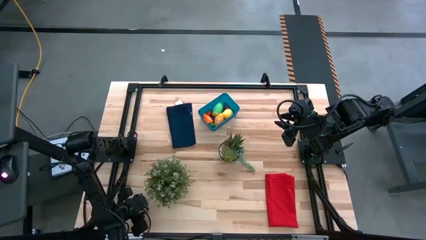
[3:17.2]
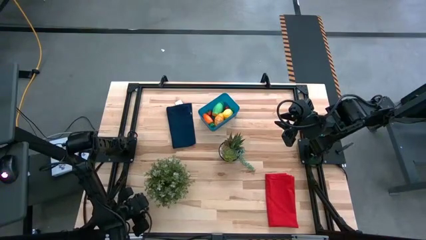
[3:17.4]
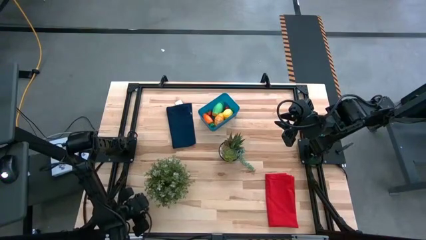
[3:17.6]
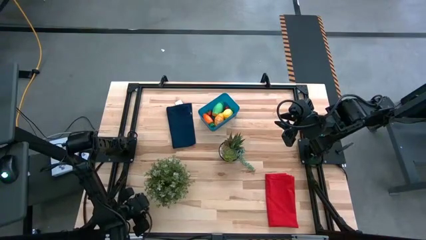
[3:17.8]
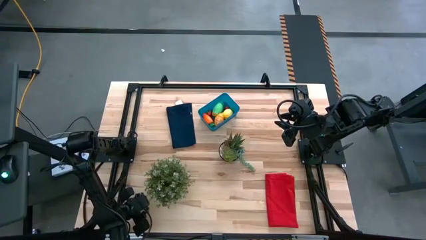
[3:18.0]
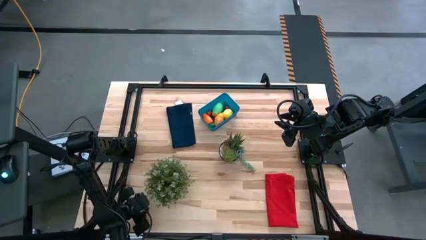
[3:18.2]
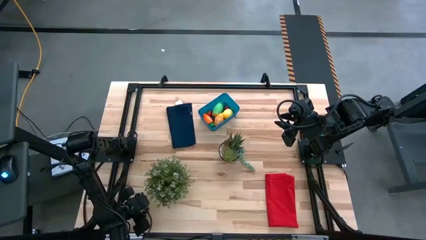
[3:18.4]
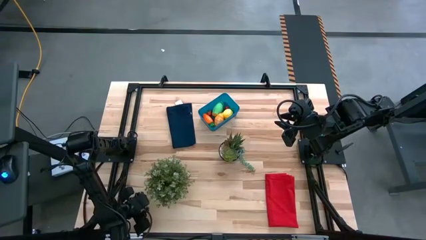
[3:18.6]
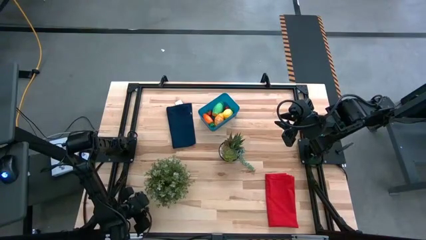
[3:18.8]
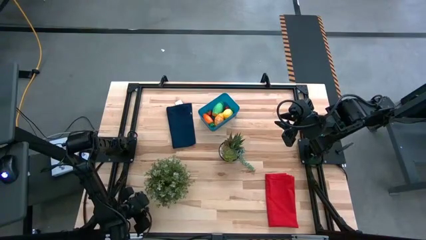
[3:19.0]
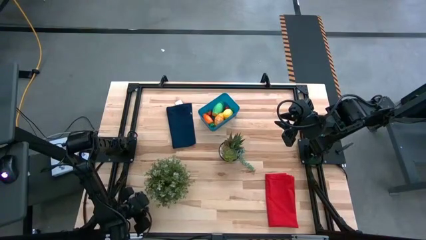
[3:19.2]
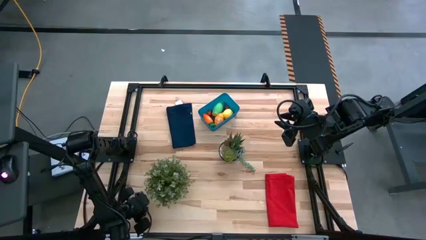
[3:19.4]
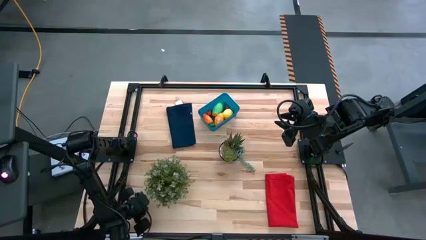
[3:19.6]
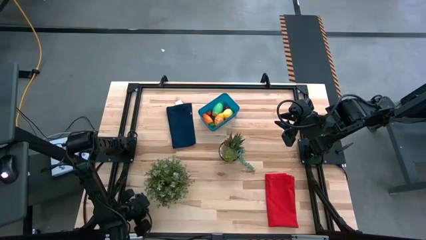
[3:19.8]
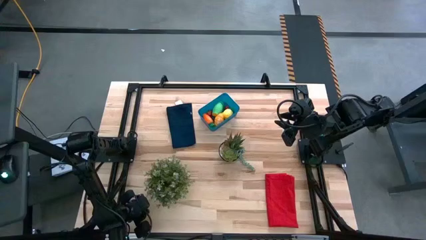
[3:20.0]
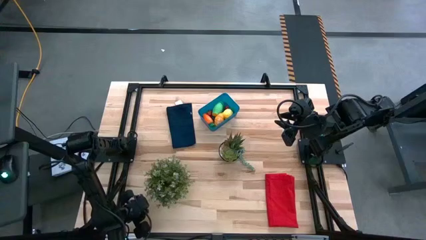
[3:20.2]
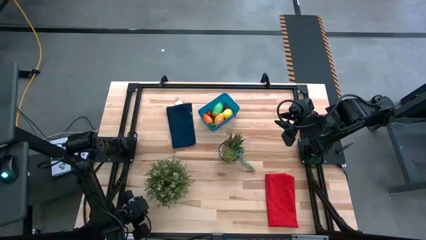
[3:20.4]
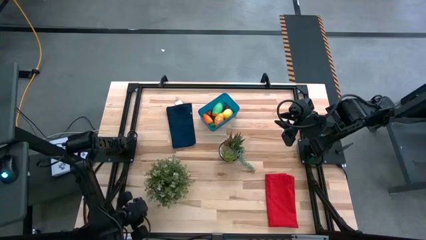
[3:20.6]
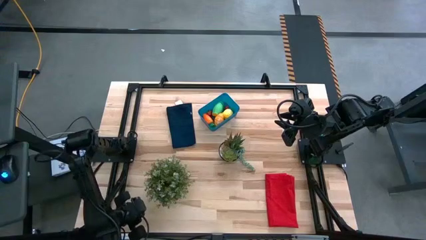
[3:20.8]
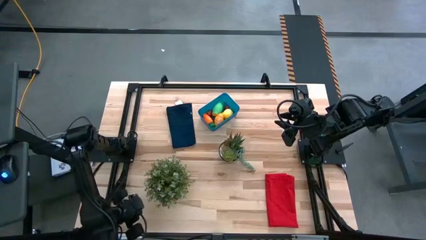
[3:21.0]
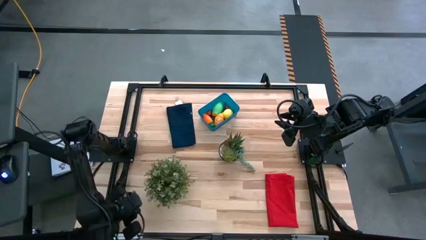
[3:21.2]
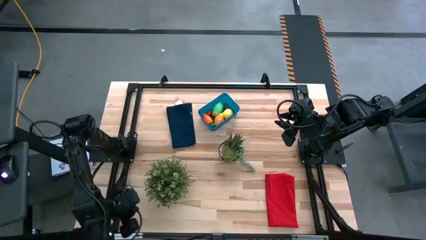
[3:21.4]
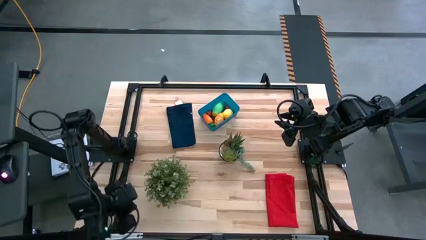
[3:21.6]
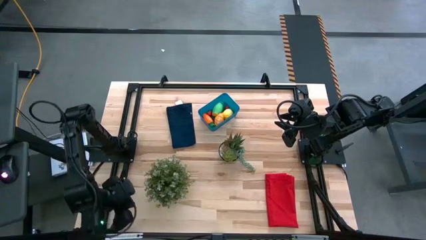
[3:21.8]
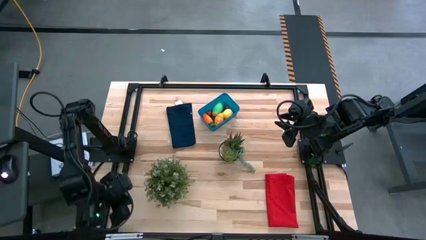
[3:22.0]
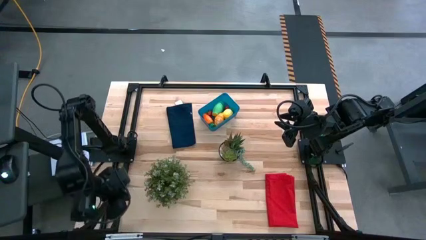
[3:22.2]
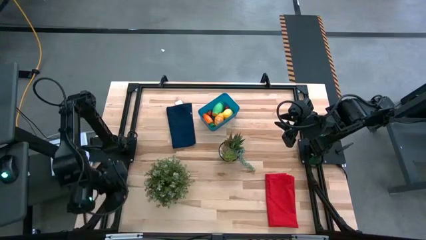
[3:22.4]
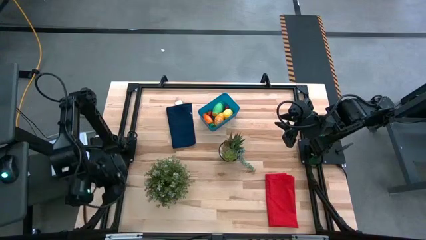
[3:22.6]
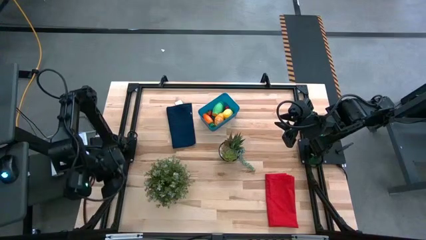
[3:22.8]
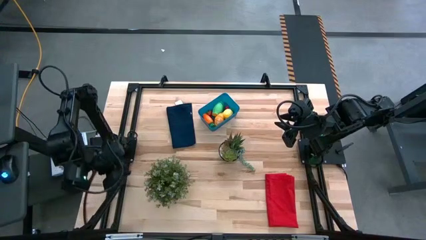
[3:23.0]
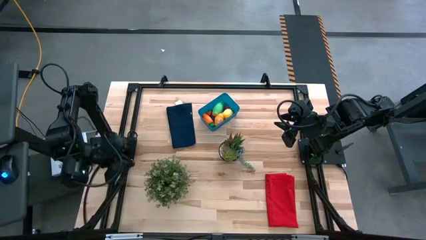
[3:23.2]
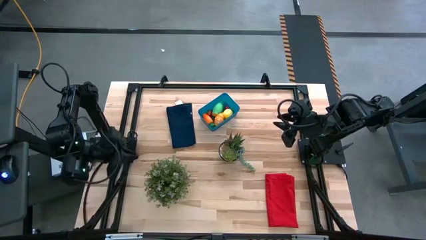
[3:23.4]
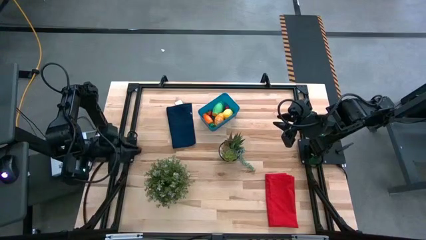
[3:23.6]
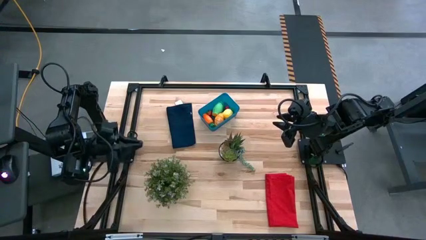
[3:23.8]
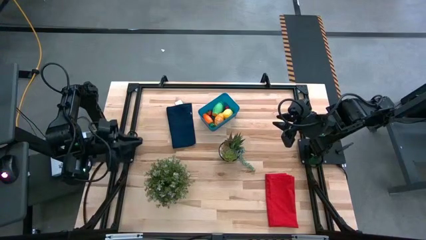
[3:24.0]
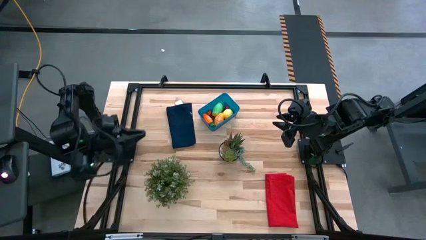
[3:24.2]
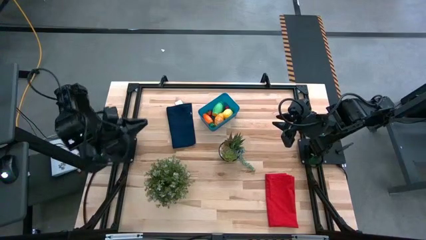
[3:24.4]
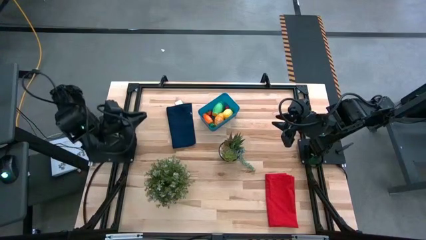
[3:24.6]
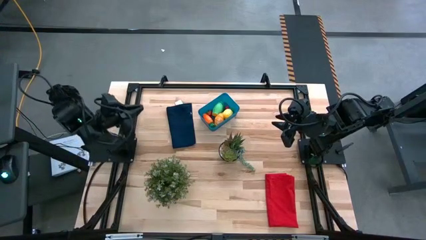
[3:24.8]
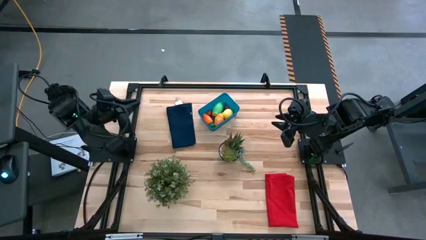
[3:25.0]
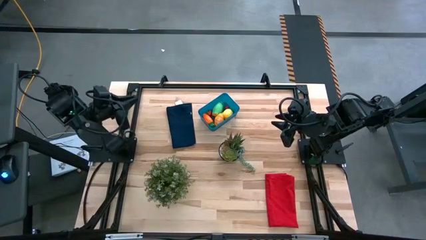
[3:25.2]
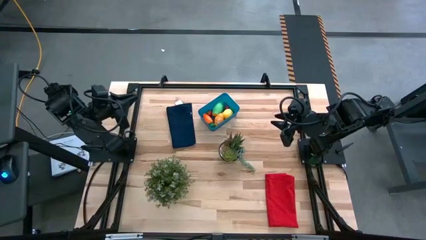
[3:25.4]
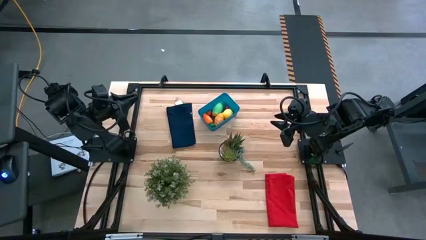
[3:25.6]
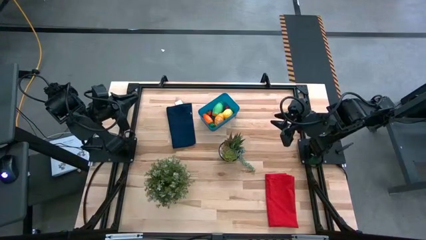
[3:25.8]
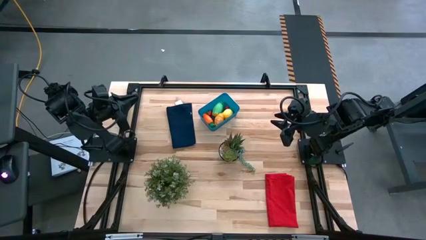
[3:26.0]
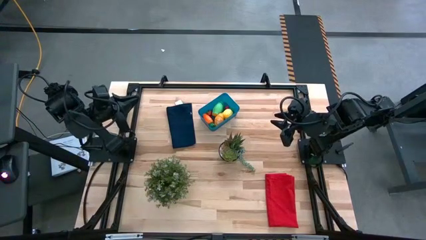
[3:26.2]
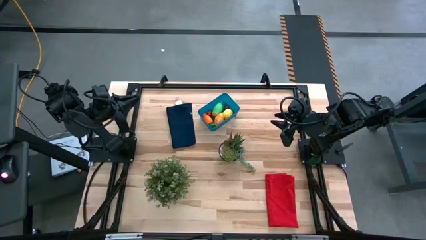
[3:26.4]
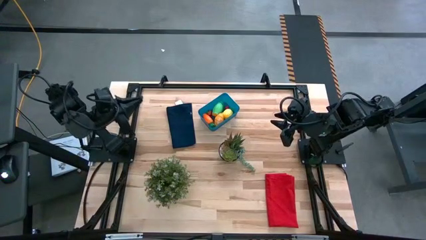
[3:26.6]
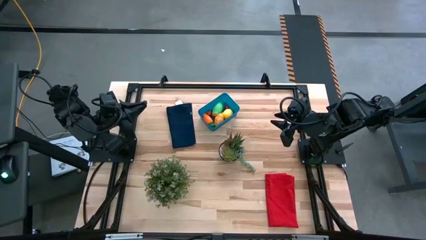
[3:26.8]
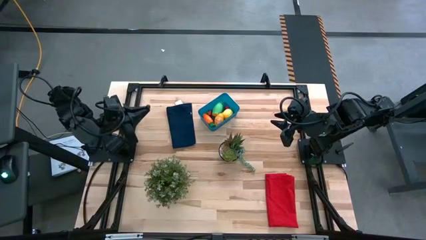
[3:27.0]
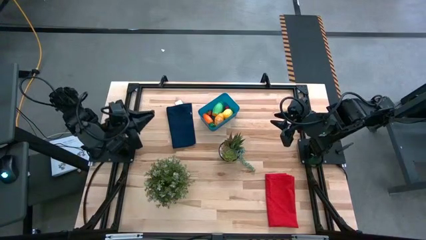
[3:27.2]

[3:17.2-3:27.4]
Task: Pick and placing Produce into tupperware
Put the blue berry into the bin

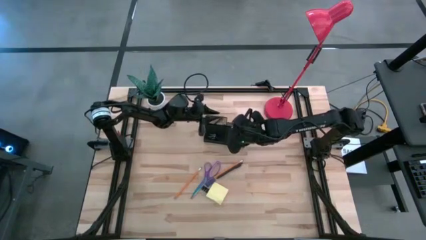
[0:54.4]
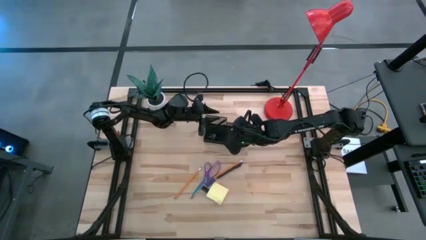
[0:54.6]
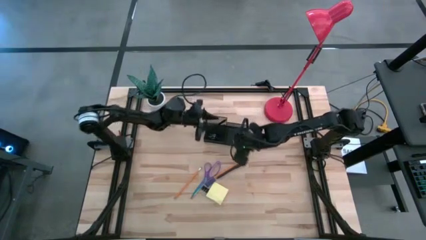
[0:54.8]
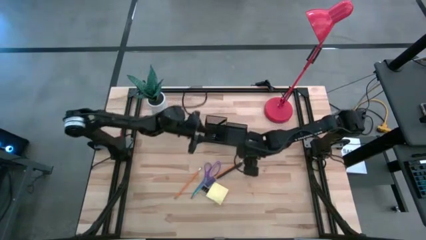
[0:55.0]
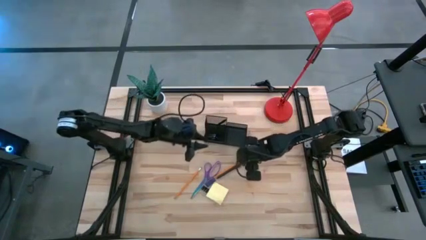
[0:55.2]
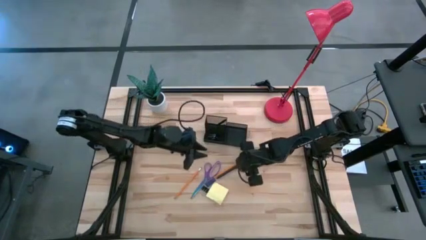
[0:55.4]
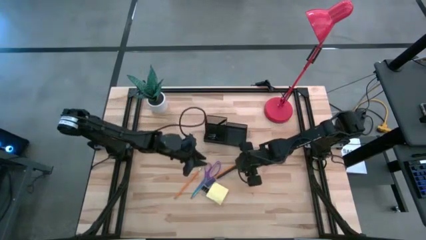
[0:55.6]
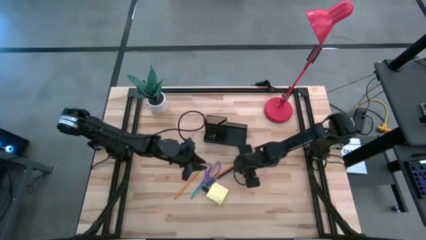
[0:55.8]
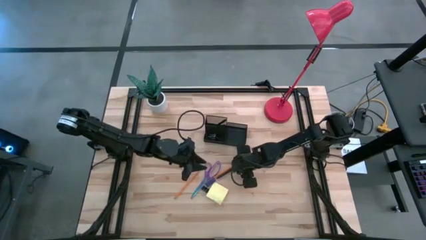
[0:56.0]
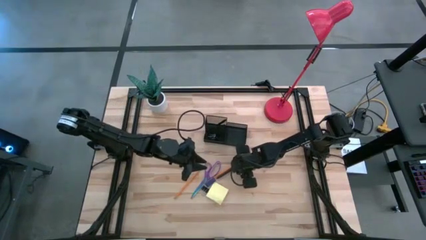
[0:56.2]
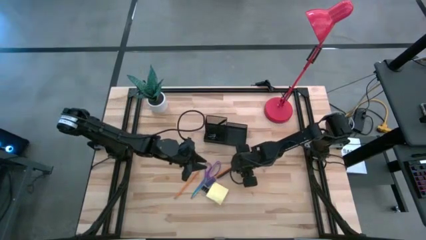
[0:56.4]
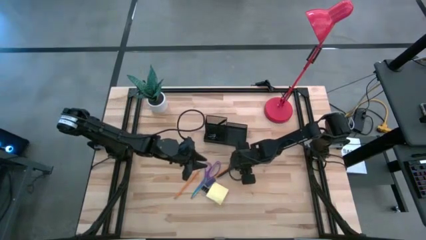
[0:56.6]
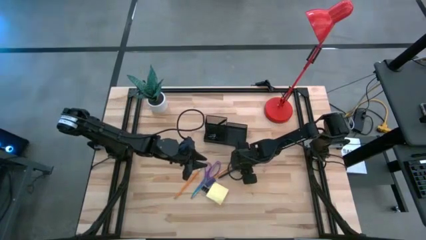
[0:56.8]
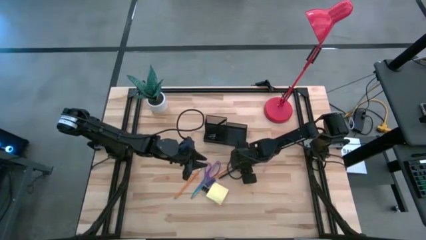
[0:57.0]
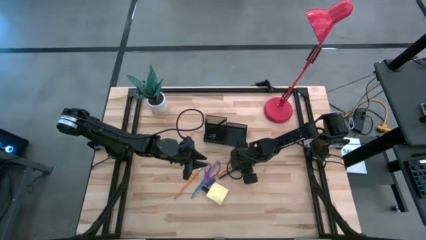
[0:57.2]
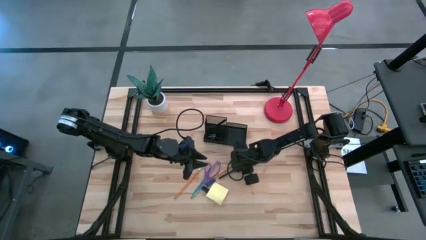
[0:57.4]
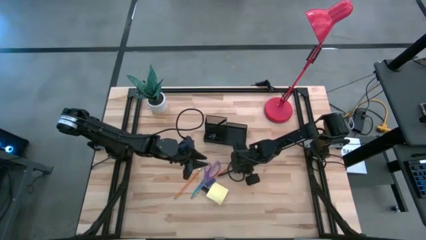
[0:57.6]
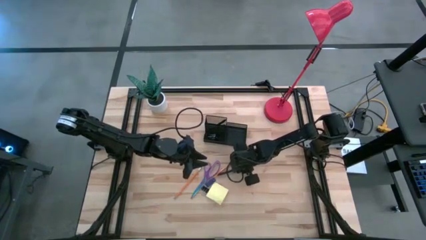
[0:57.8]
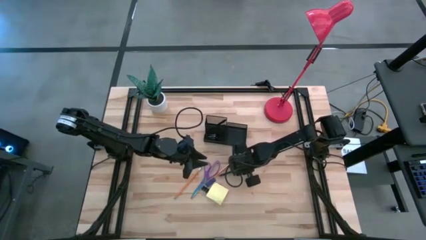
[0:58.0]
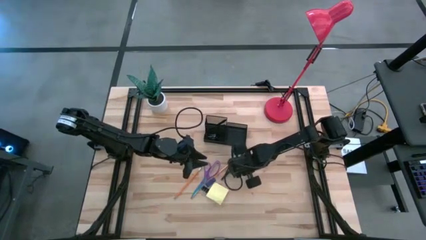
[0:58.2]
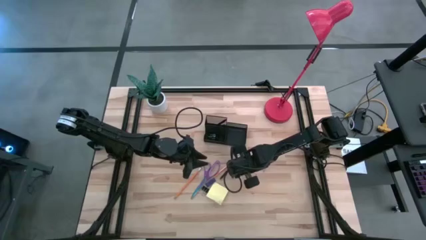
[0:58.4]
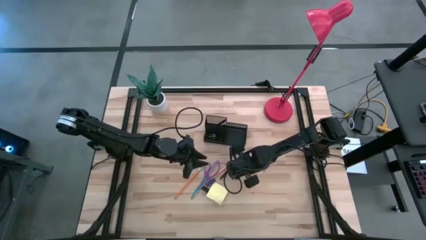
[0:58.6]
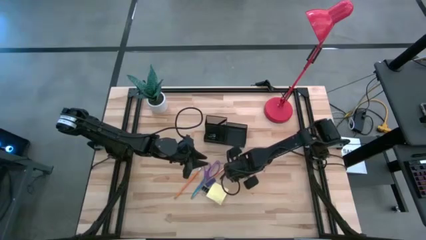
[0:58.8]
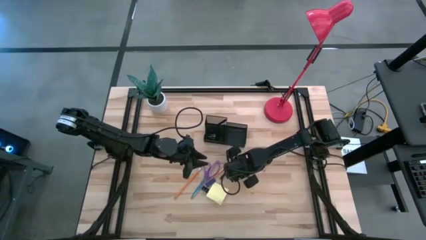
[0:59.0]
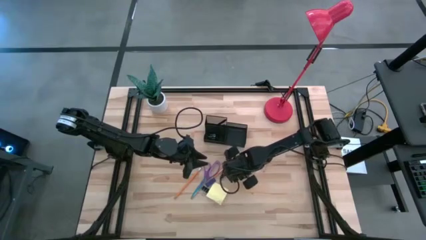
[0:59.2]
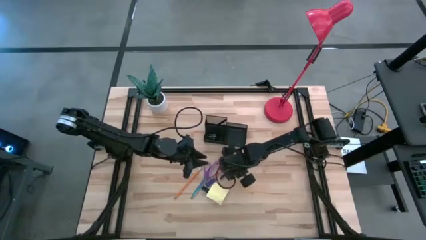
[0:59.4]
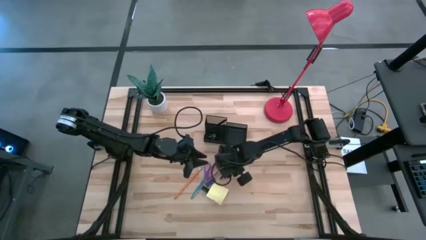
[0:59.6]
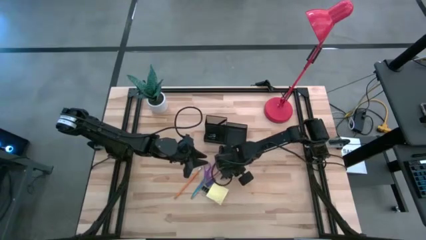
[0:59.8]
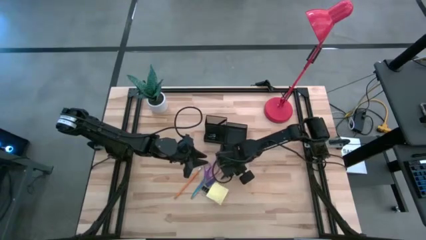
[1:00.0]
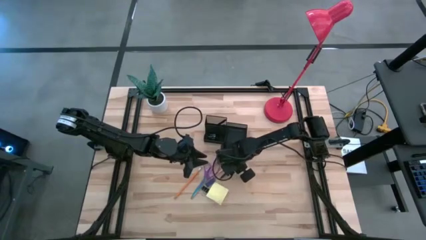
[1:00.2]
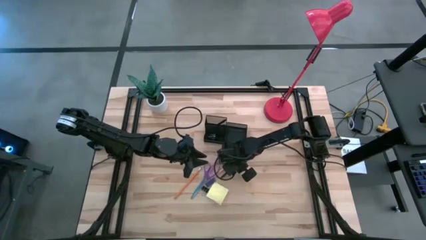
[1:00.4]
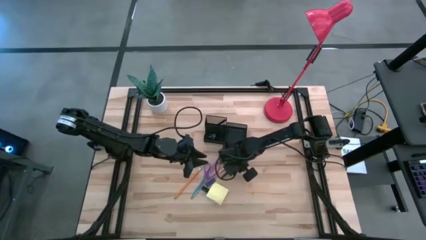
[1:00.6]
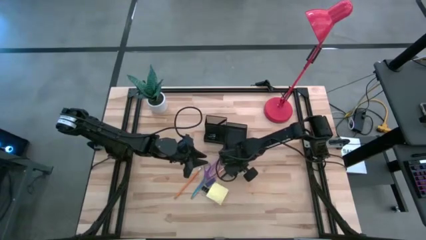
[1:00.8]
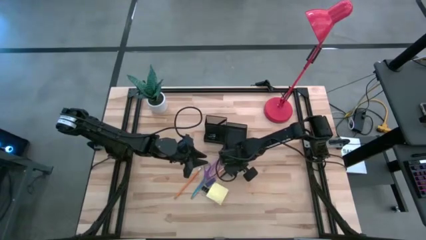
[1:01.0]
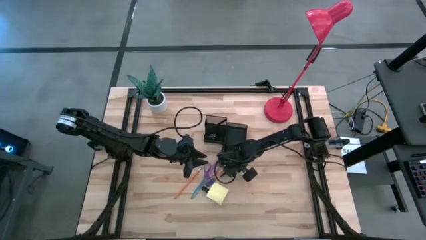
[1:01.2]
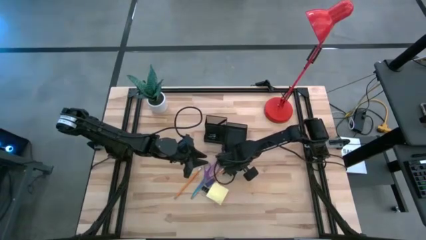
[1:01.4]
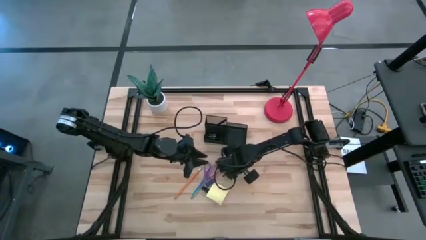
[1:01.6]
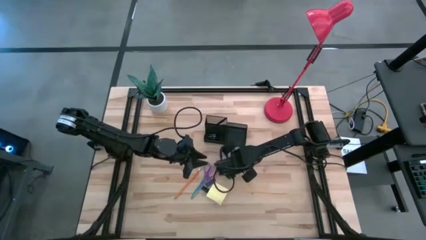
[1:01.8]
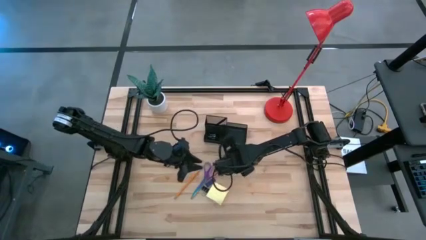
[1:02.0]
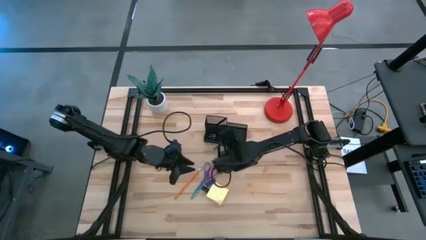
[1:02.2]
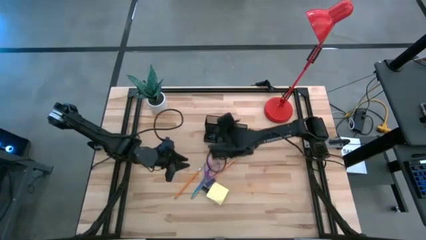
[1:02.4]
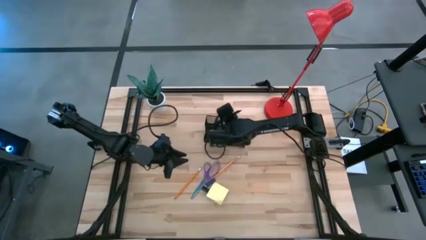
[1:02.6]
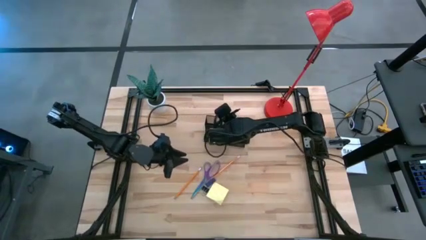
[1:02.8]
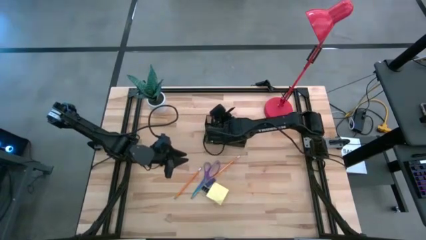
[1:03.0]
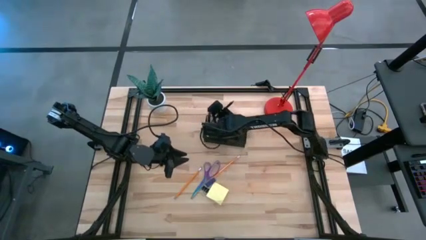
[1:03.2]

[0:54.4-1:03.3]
Task: Pick and place office supplies into organizer
Put the black pen into the black desk organizer
